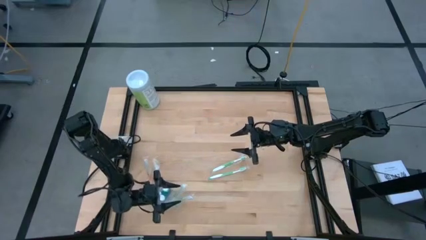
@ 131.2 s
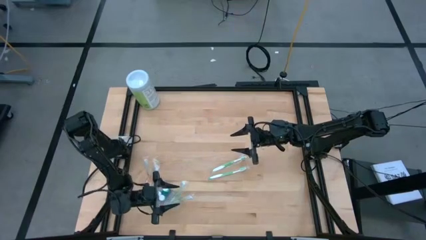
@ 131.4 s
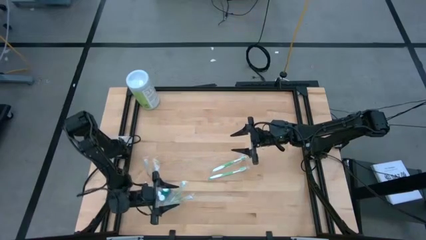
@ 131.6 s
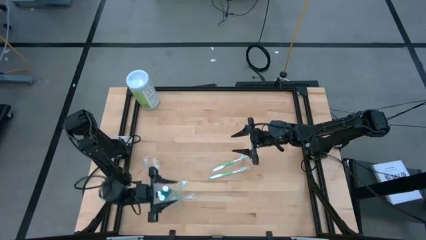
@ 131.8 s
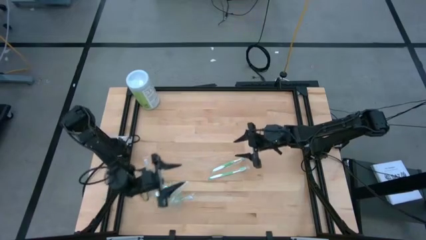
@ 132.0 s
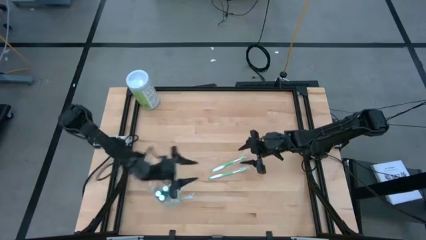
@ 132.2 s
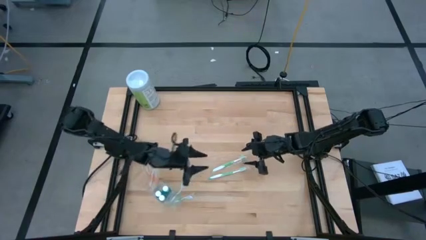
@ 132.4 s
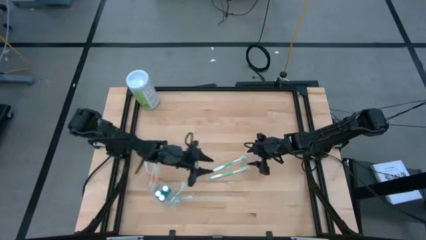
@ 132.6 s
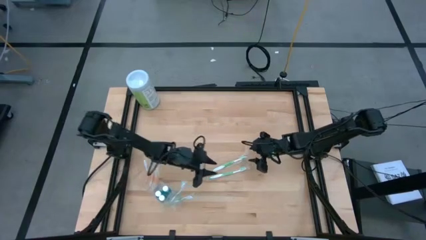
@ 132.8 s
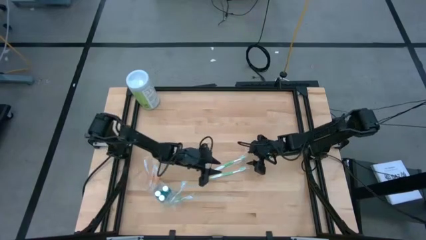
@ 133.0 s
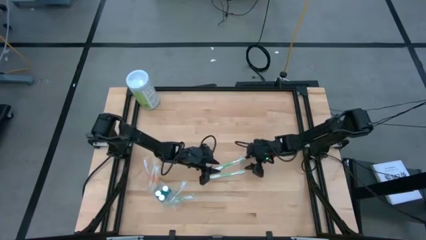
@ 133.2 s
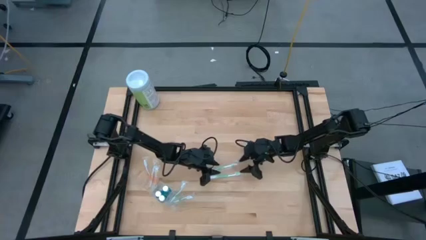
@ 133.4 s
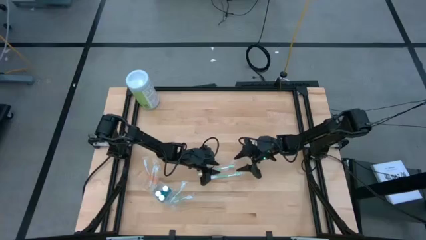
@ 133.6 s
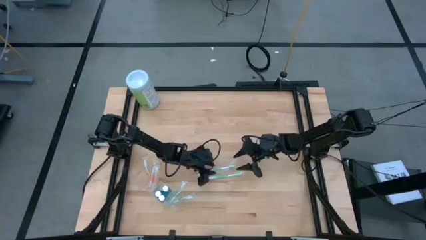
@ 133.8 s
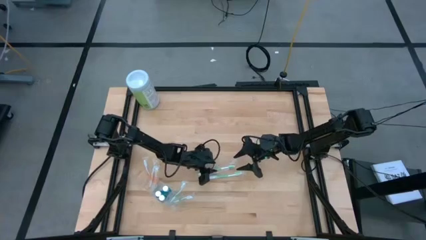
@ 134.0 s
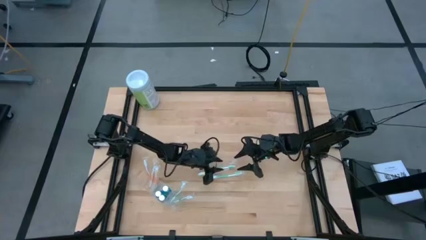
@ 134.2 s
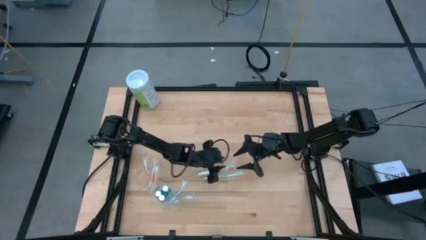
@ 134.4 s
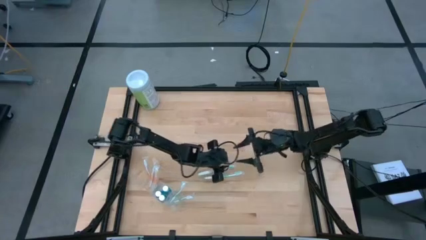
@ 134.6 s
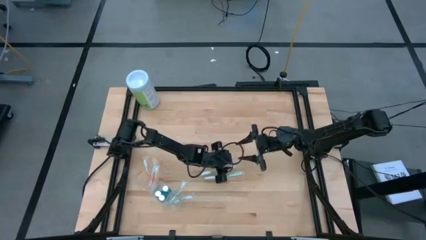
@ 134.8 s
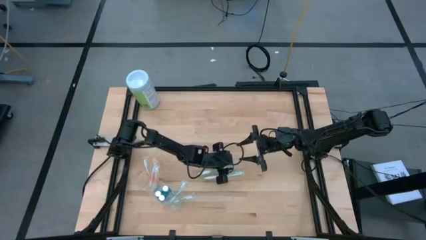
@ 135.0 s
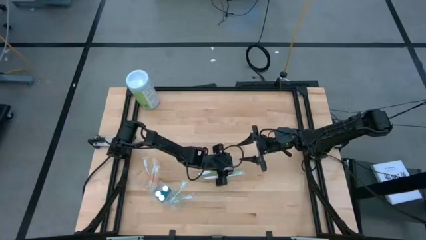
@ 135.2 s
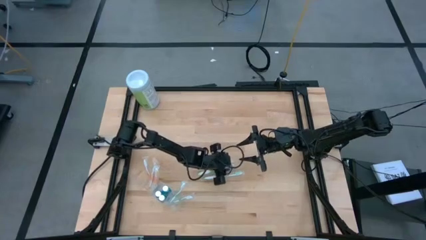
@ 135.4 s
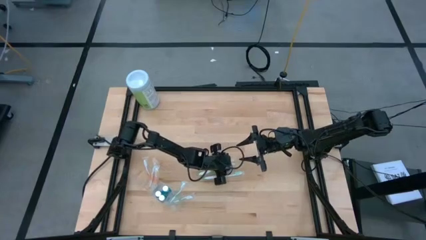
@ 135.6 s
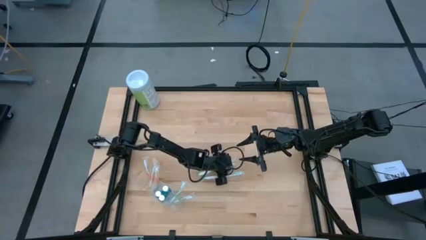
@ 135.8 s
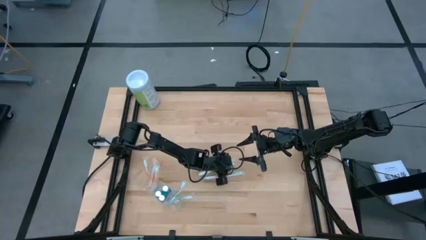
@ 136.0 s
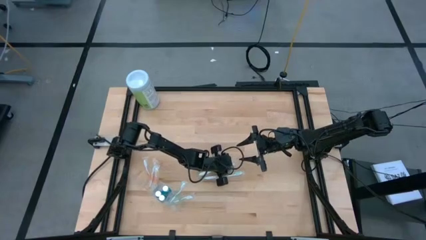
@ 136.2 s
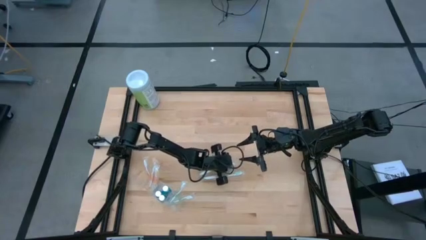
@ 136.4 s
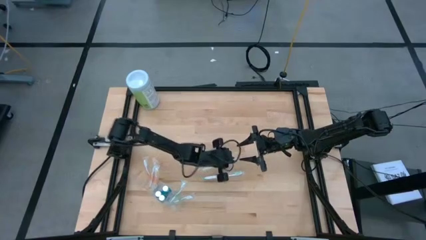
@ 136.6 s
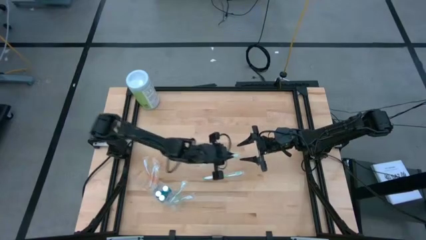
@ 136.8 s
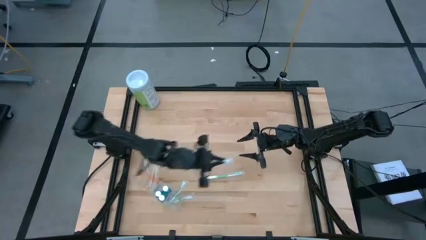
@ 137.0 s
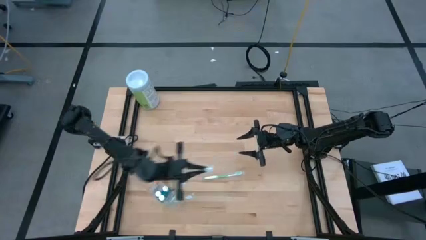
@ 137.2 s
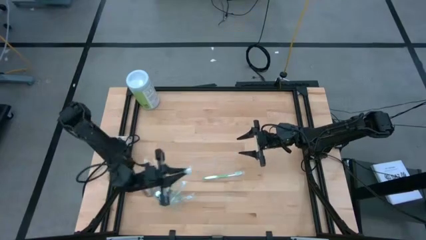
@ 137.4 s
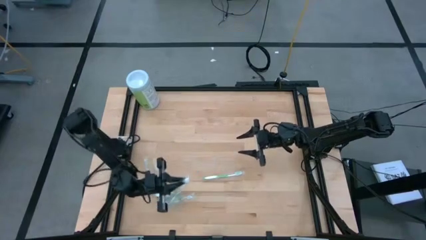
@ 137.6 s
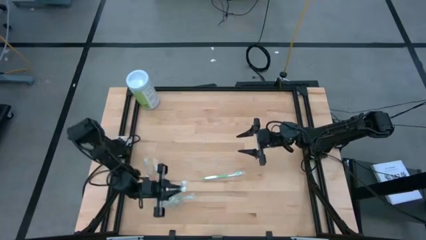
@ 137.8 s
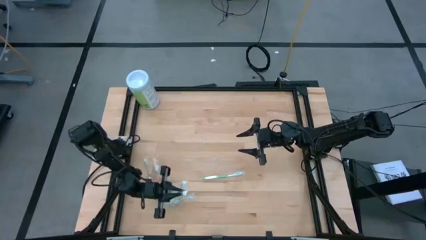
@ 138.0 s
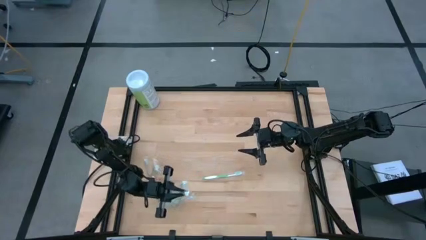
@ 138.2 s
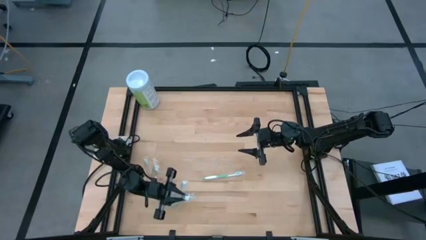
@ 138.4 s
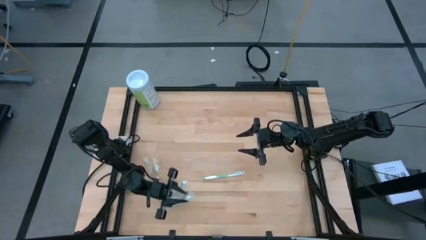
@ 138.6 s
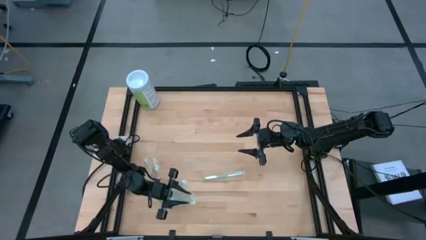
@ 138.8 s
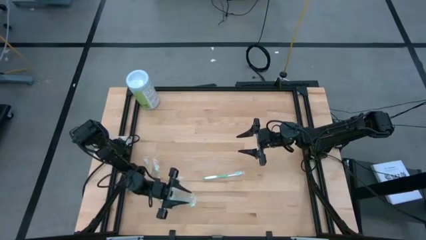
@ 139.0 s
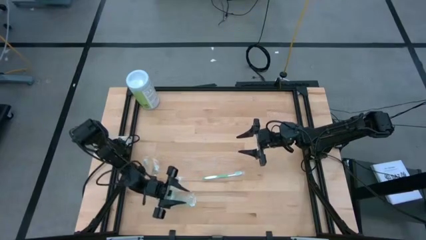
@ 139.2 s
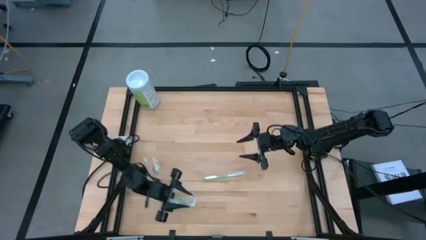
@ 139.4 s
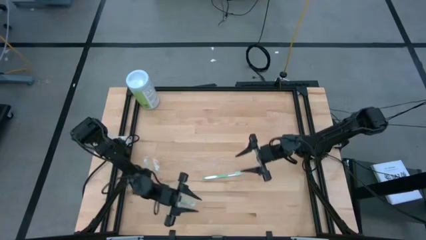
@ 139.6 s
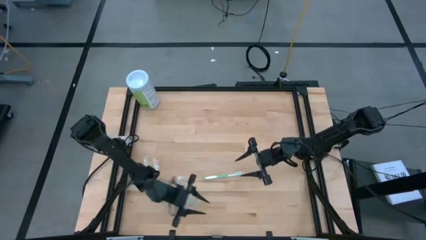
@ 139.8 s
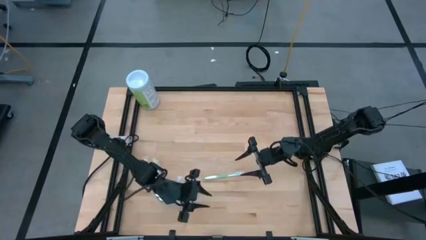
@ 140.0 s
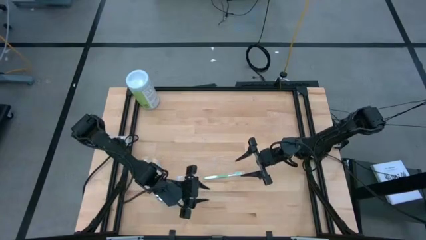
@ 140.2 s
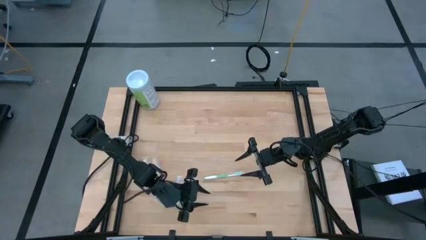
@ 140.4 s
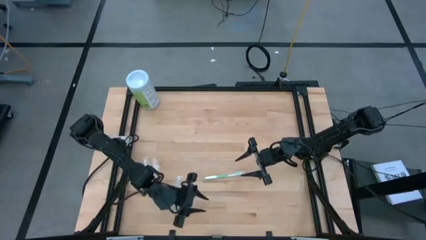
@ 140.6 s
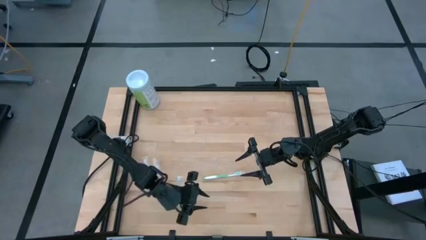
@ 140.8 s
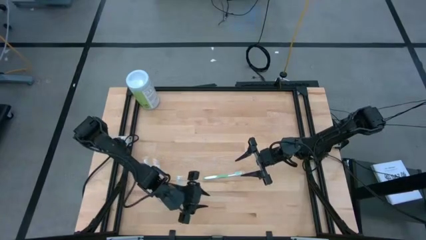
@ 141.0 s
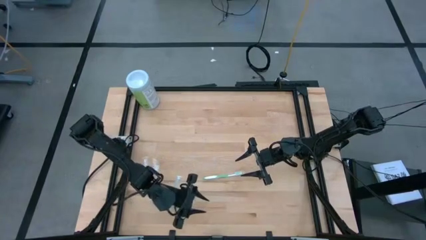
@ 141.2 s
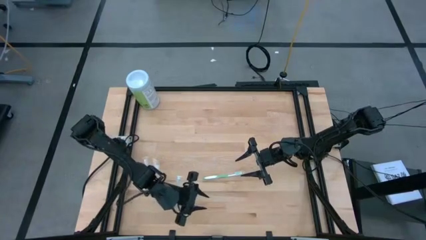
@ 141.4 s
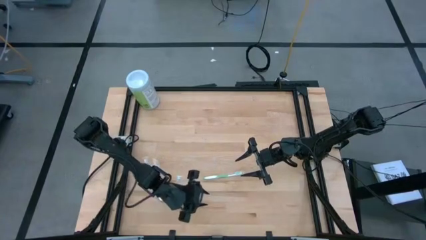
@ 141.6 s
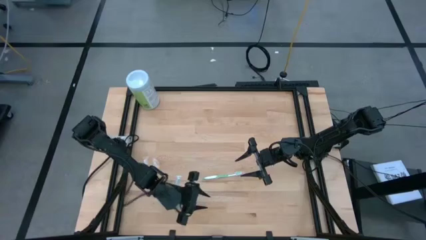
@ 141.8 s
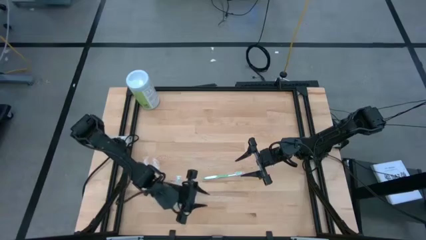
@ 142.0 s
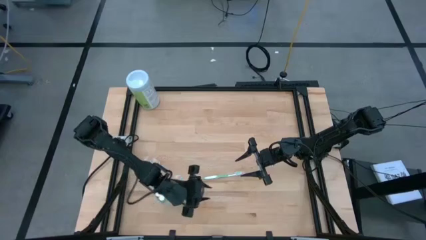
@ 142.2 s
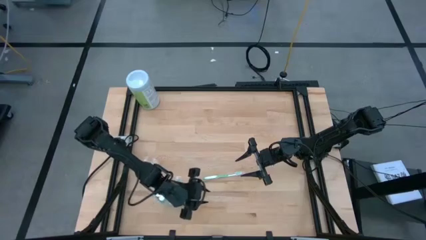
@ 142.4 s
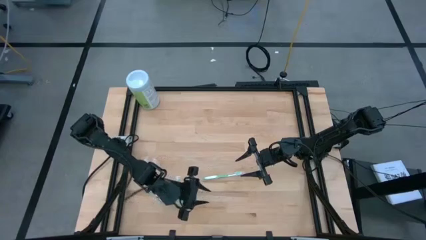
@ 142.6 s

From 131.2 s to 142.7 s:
Task: Pick & Place toothbrushing station
Put the green toothbrush into the transparent organizer

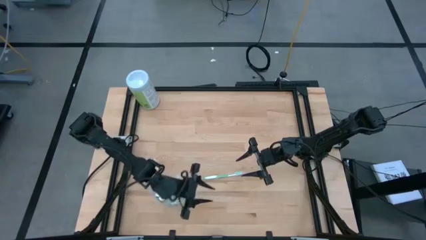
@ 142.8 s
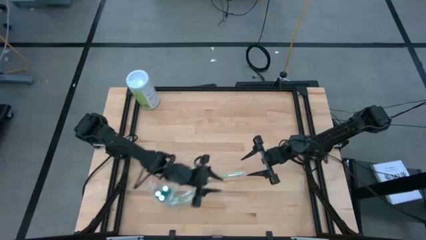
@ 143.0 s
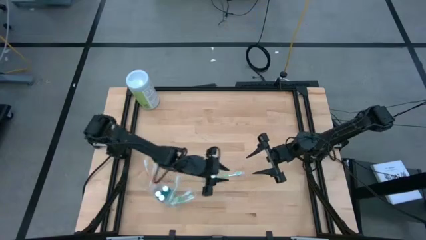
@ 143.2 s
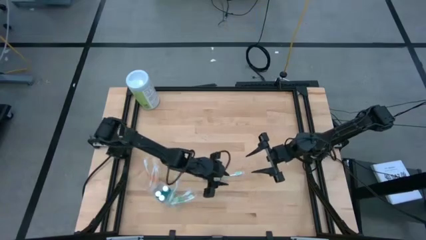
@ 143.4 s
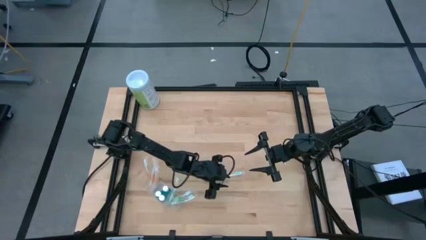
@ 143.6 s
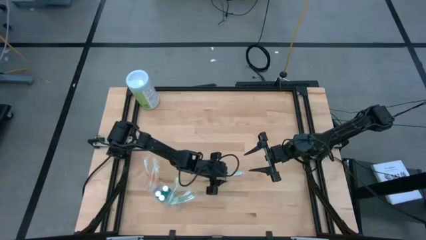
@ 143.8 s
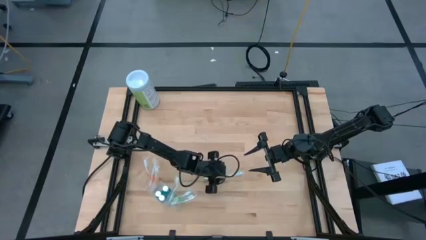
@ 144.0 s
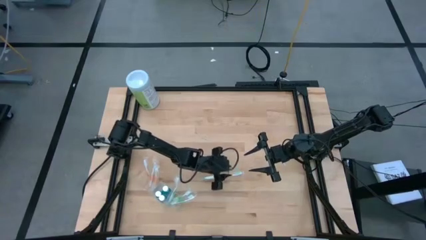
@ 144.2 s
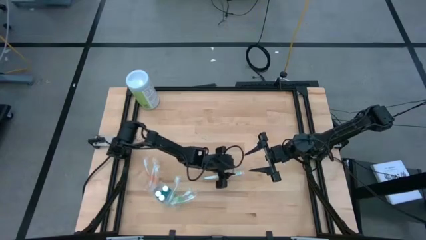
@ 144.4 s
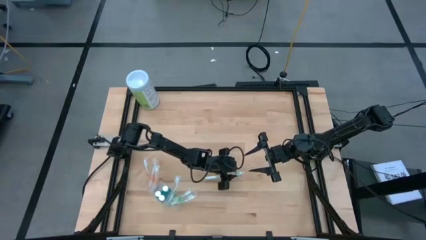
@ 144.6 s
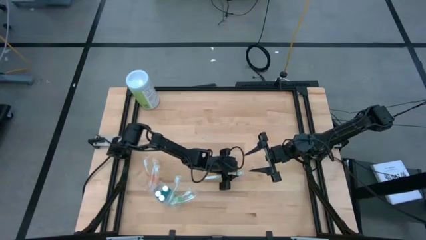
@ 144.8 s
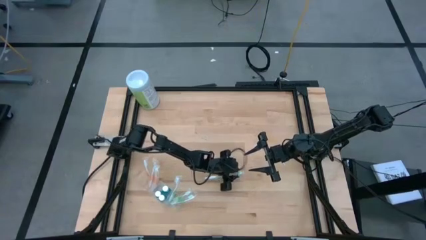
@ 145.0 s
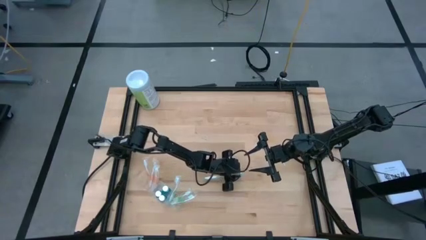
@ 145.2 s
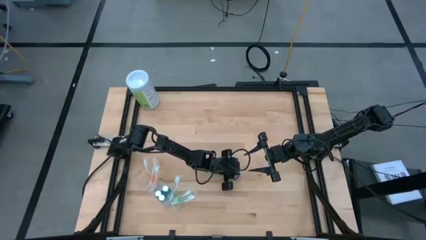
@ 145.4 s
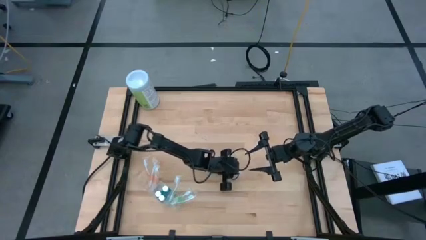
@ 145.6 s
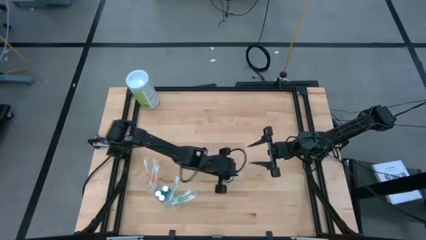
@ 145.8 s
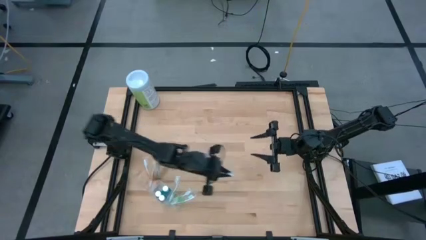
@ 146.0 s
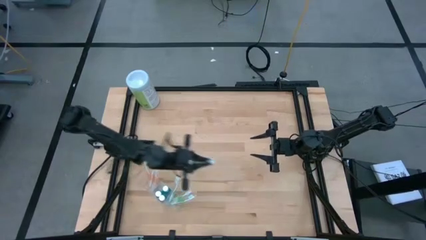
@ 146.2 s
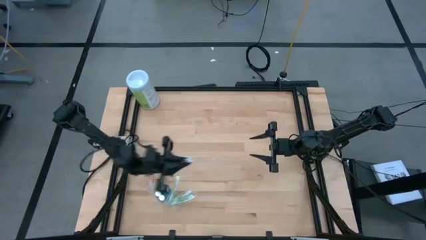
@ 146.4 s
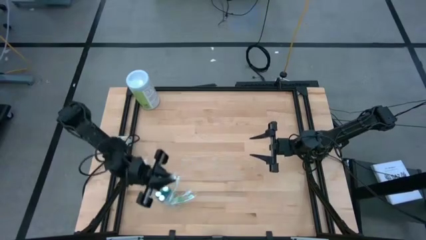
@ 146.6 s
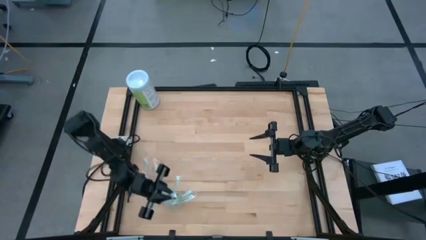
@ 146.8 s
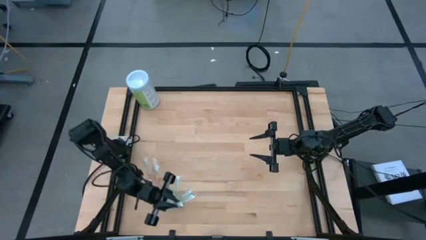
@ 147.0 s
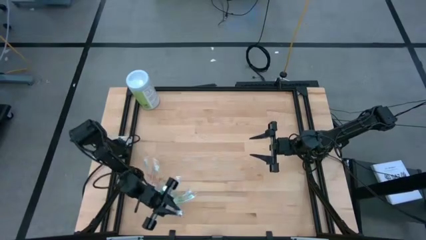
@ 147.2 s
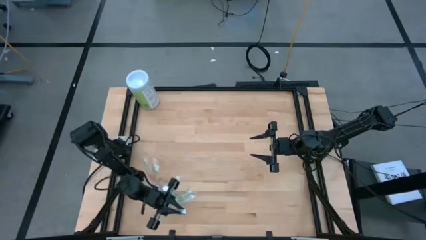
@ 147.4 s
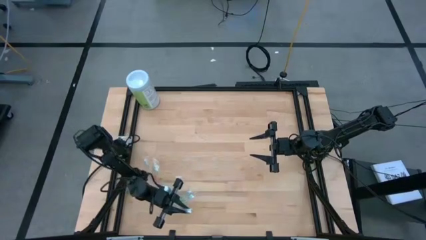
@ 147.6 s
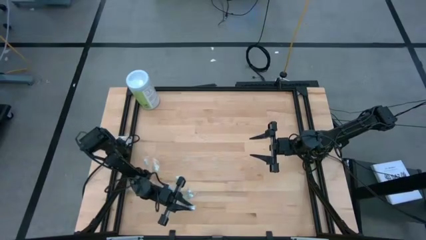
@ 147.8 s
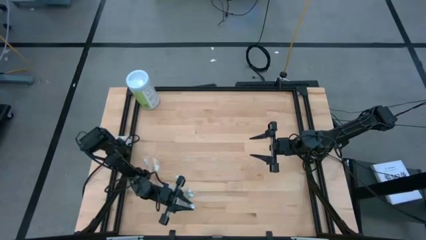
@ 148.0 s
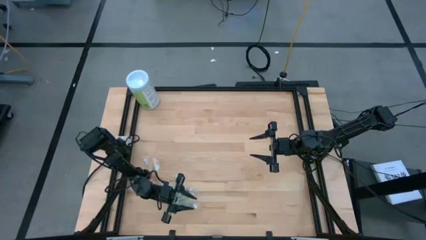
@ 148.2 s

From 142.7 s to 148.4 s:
Put the green toothbrush into the transparent organizer
